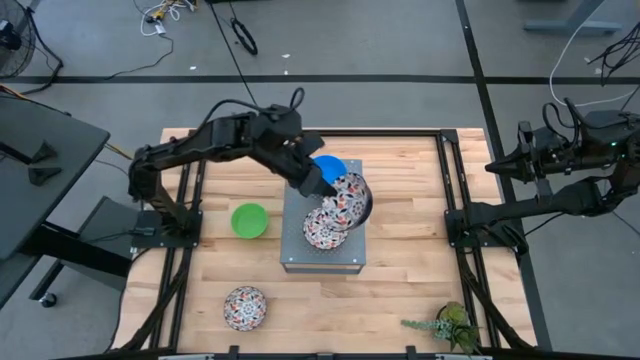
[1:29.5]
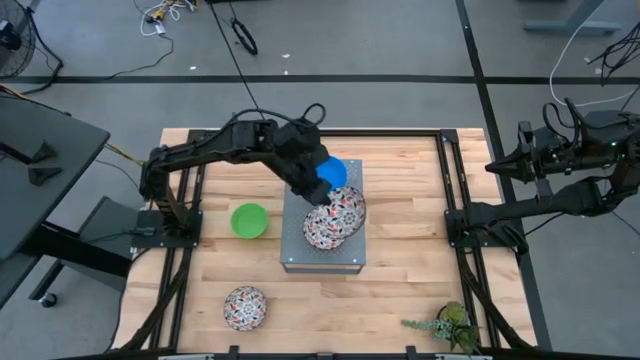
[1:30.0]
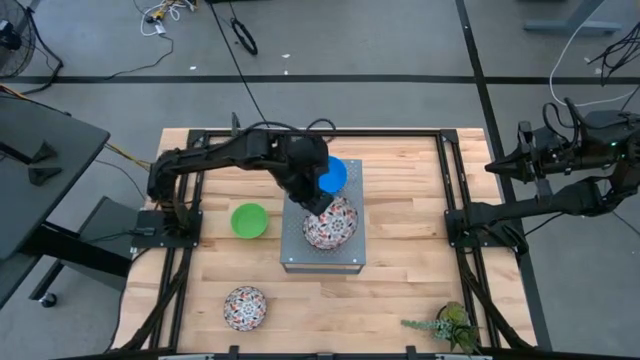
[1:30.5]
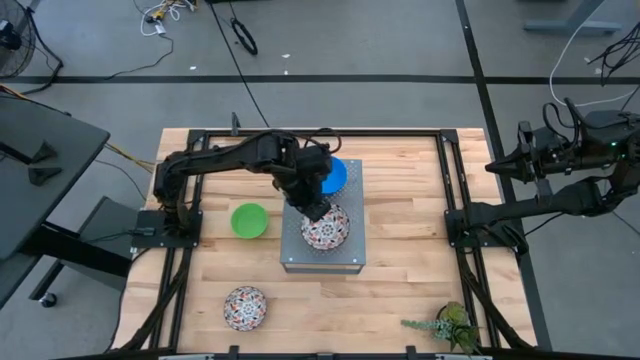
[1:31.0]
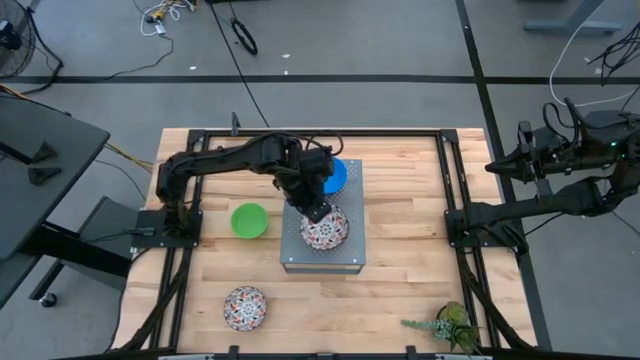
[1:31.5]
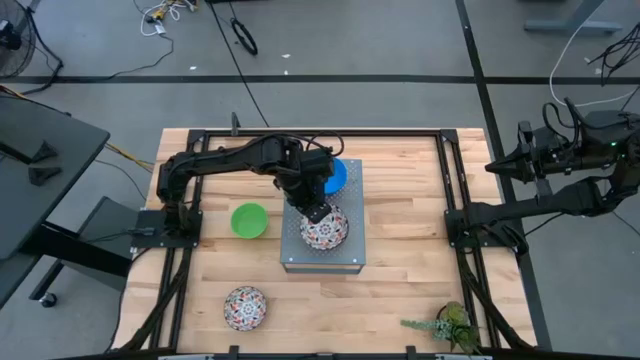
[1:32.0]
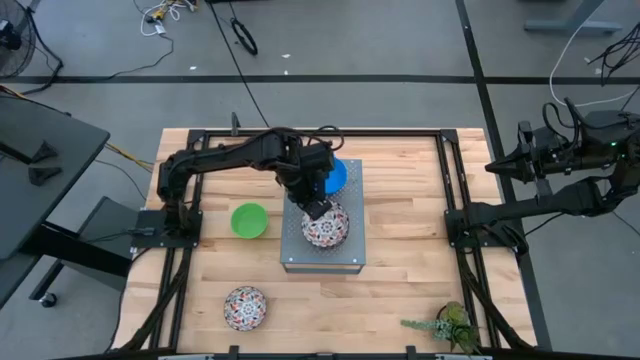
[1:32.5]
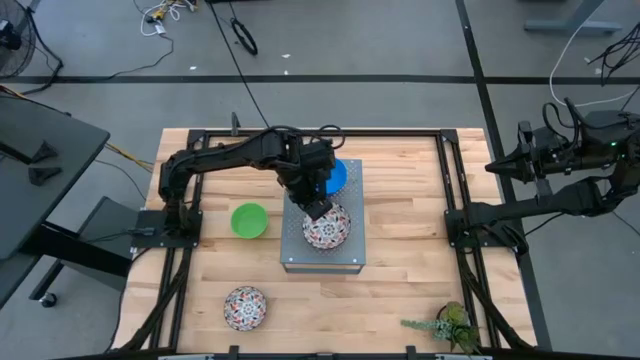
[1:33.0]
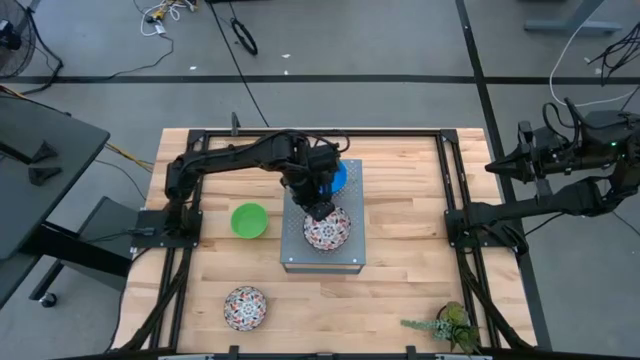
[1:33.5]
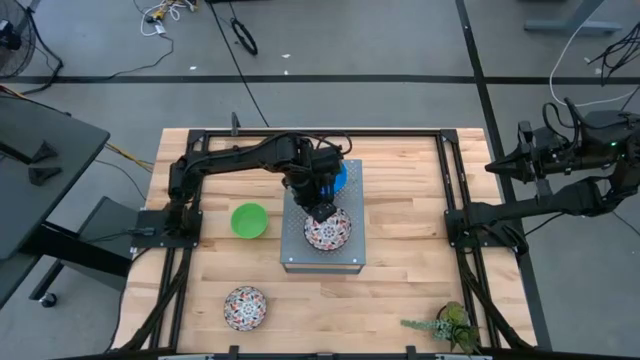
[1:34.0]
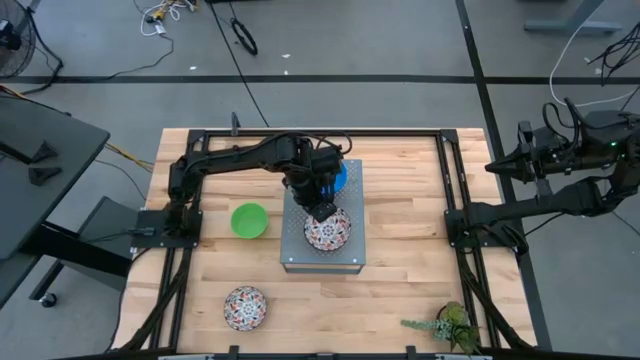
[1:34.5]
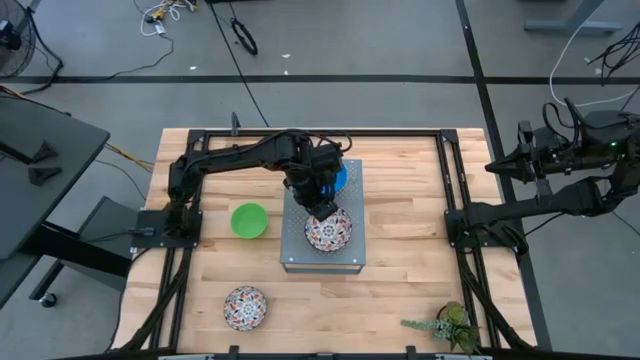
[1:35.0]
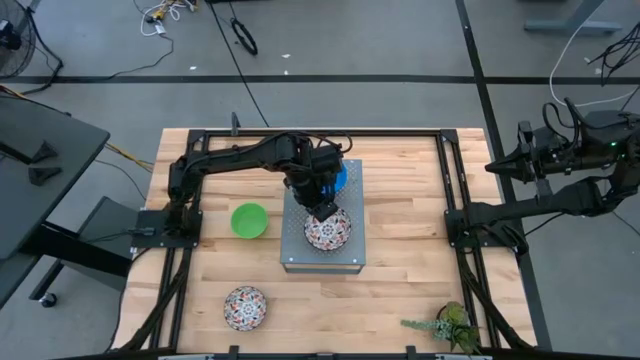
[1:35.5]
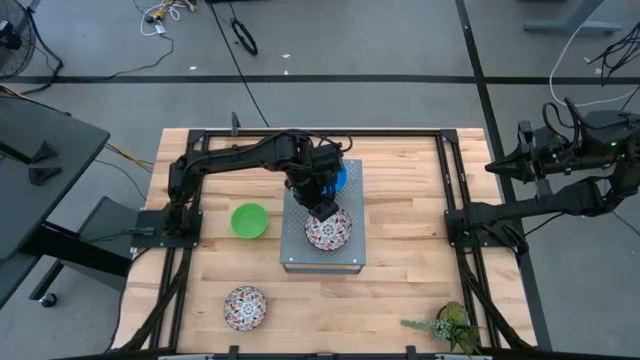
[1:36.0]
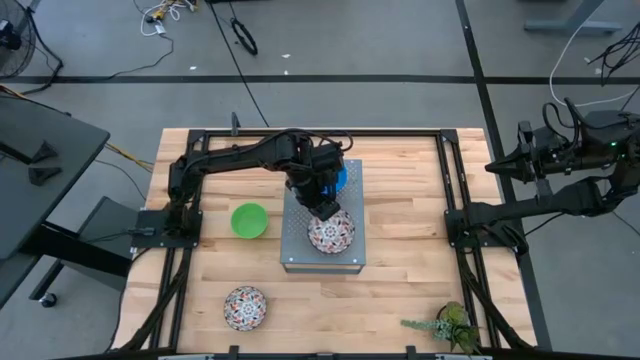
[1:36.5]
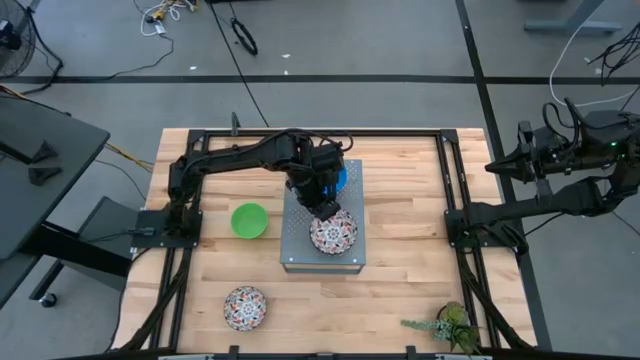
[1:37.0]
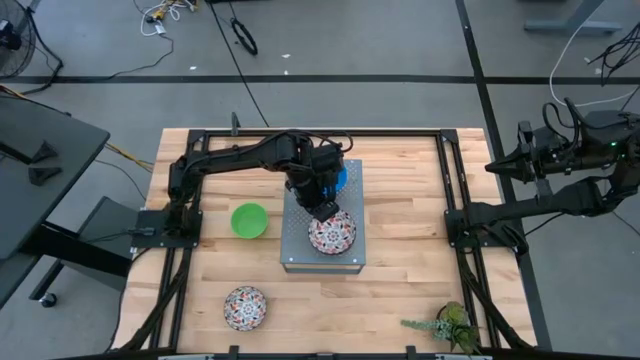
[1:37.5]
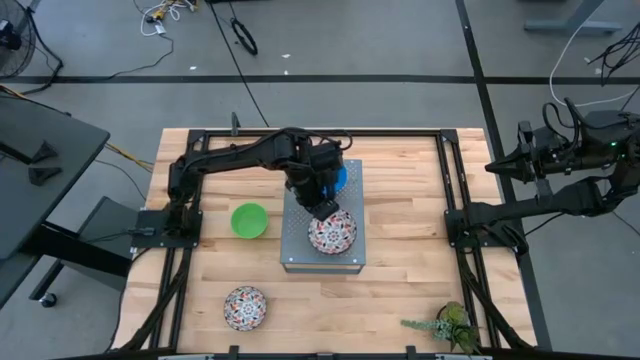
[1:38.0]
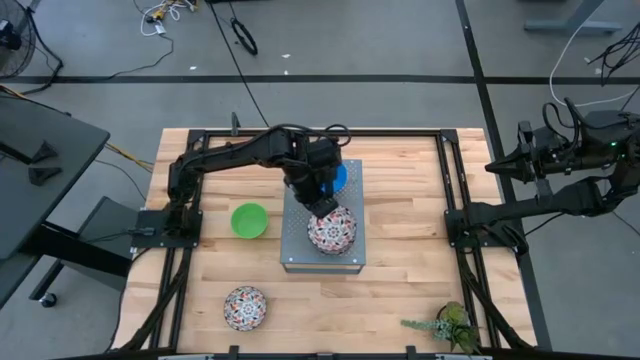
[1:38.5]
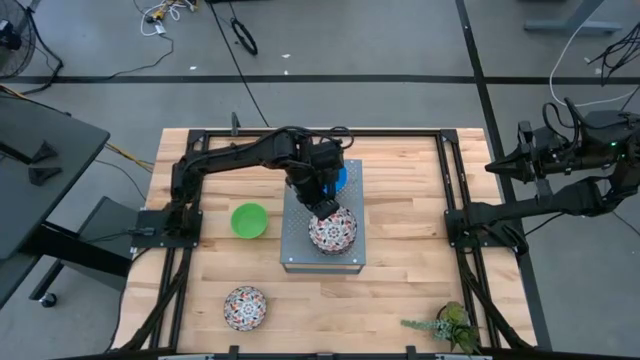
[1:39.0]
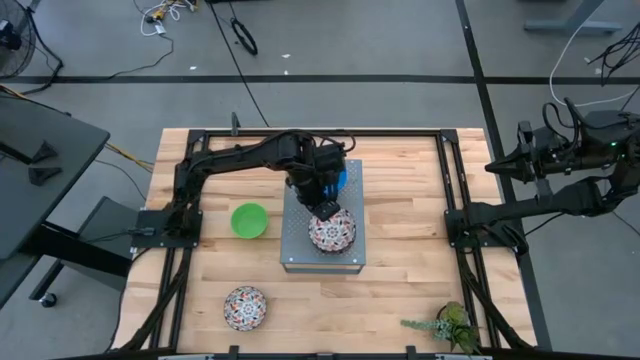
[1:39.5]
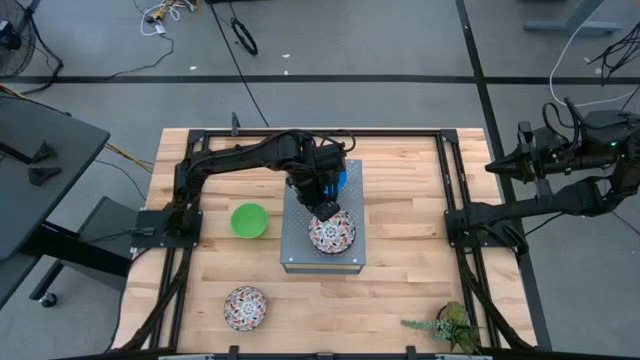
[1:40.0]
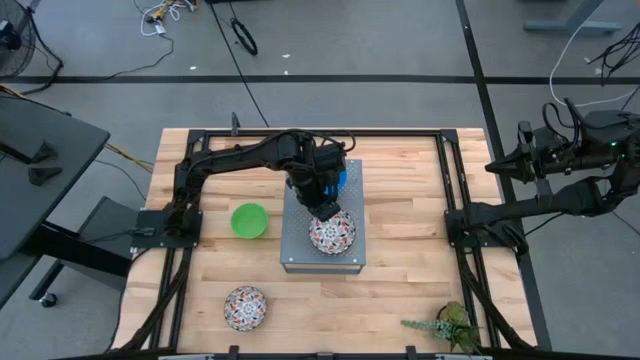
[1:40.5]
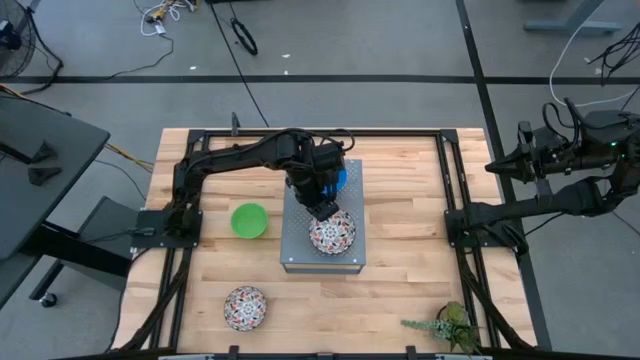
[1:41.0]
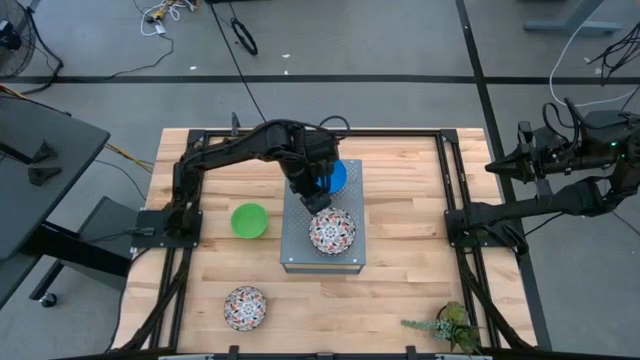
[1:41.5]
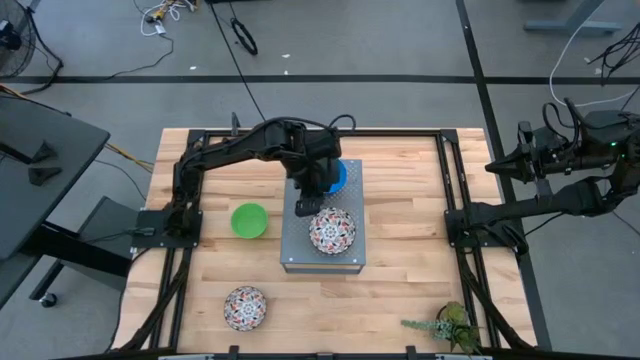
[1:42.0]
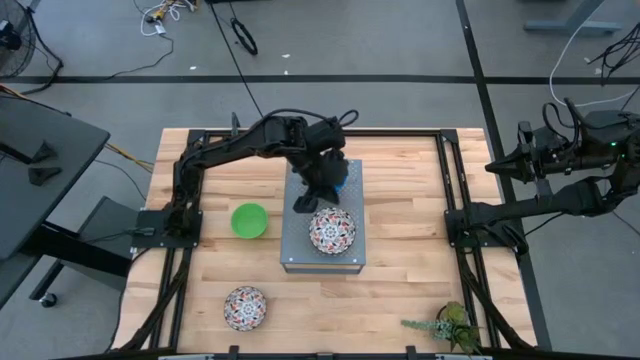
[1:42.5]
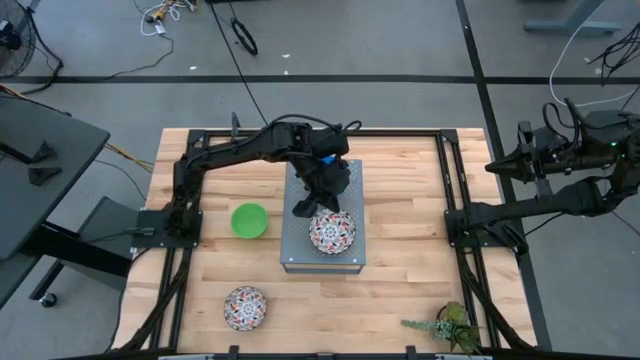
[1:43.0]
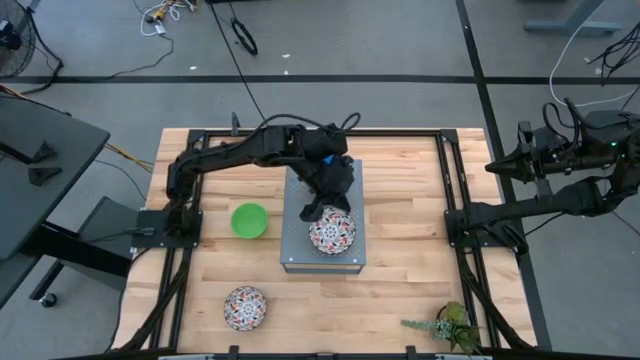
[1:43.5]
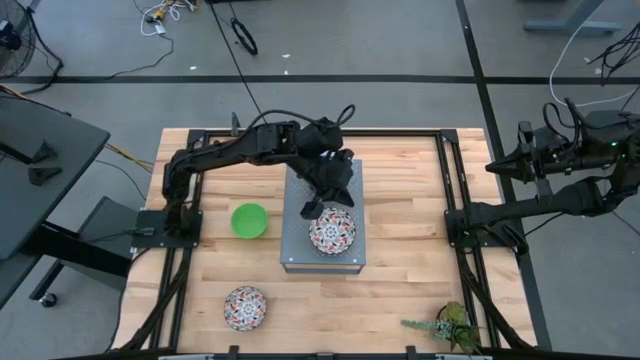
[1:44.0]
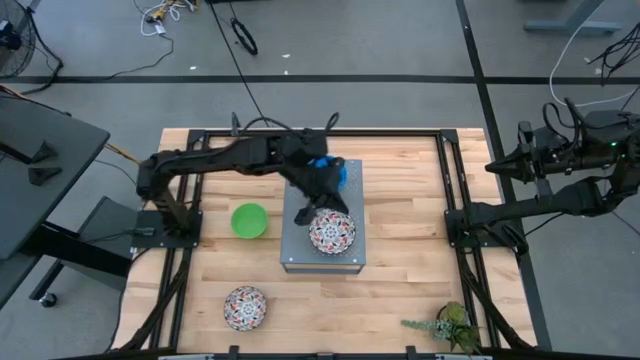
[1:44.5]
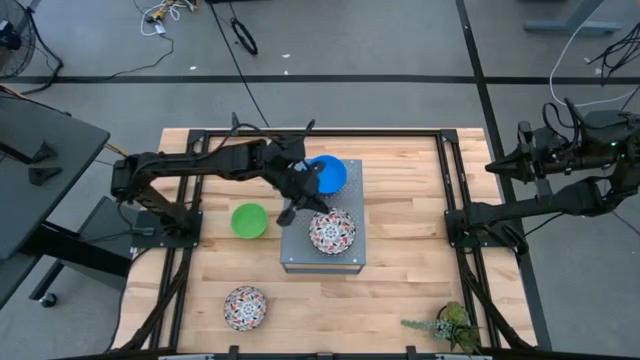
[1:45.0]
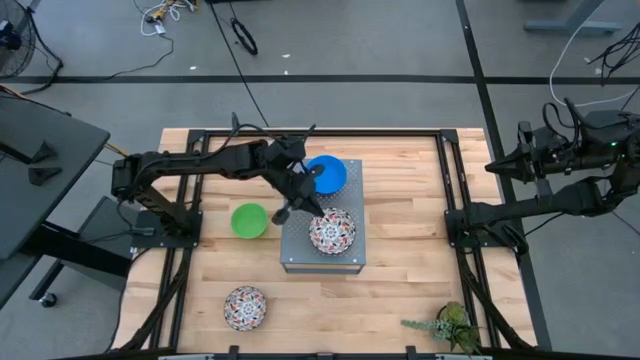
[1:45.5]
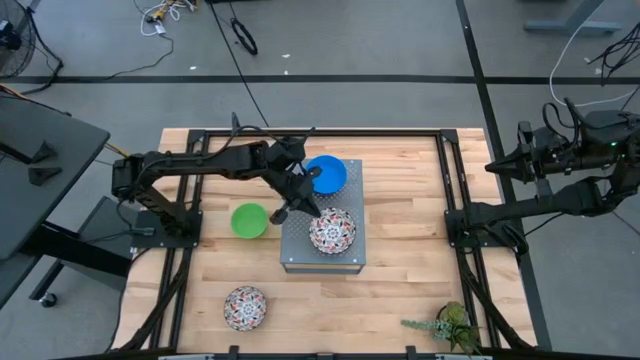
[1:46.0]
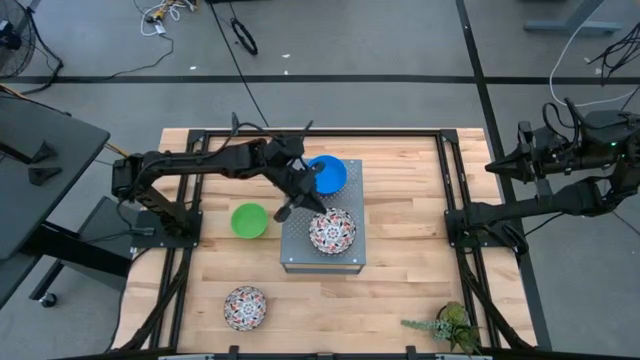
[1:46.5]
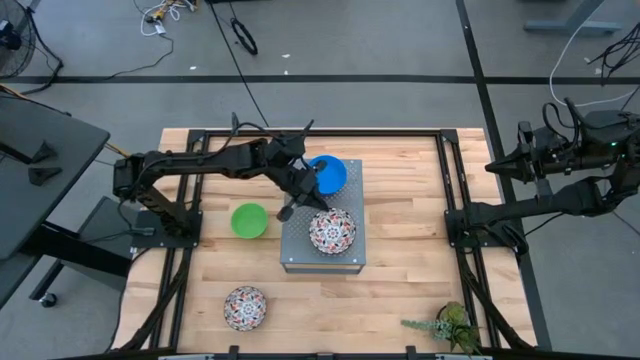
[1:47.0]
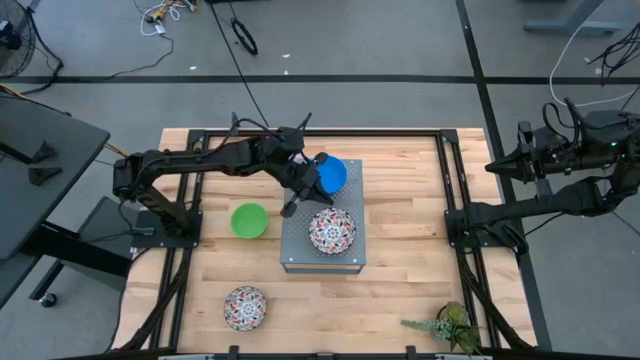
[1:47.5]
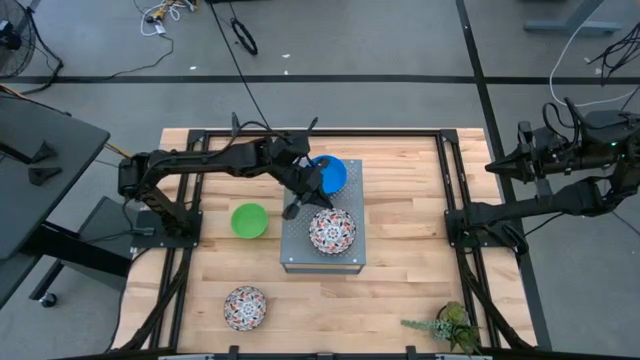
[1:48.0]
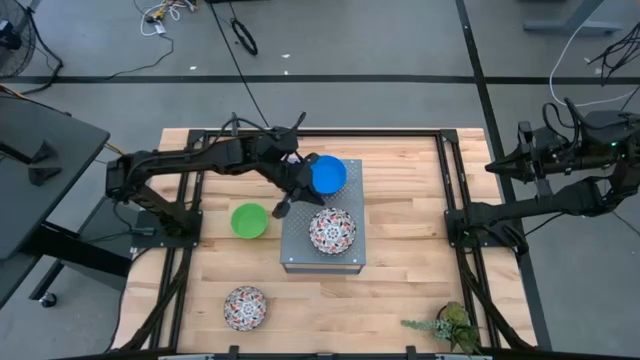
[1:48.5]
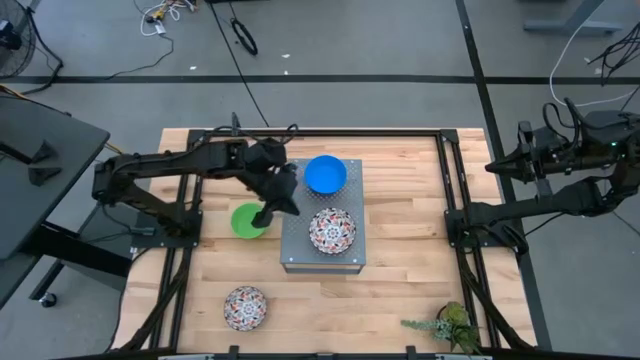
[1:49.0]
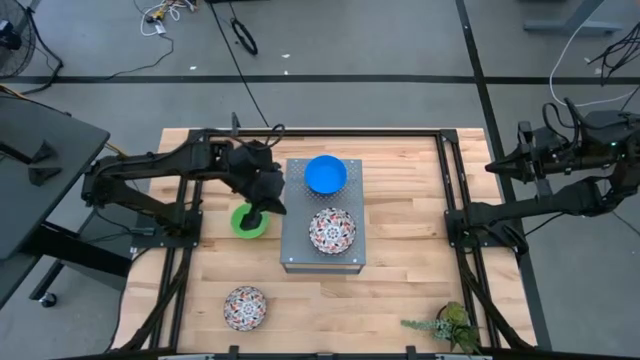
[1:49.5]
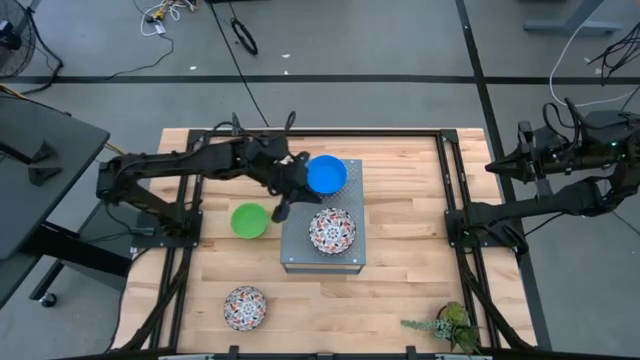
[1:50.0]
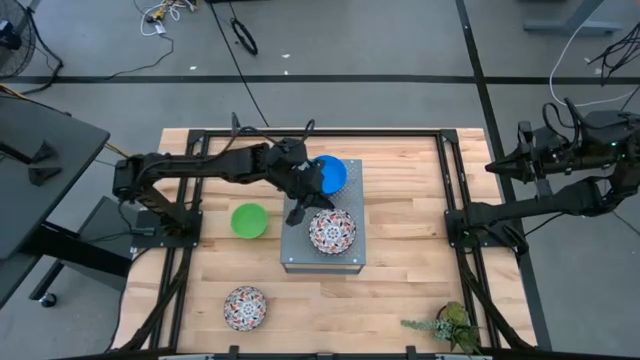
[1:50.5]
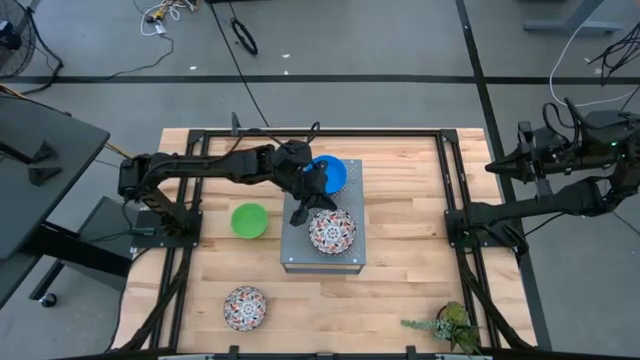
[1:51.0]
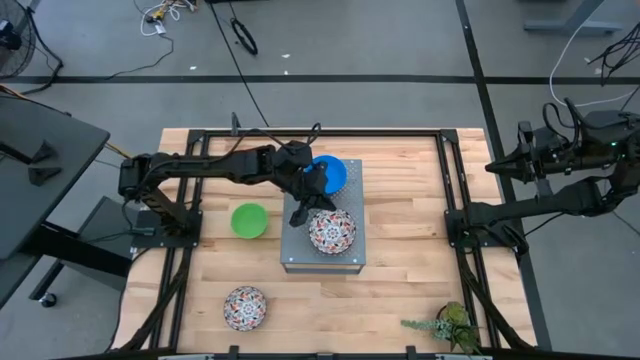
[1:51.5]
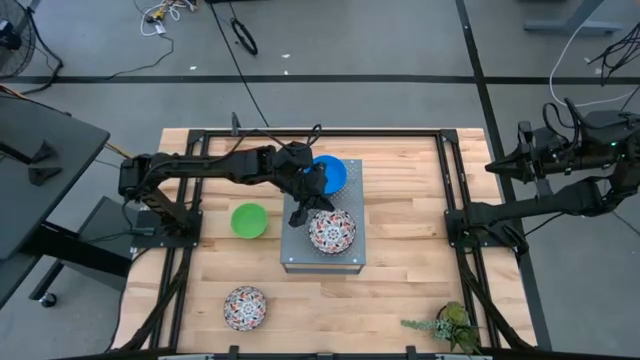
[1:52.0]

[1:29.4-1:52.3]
Task: Pick & Place Mini bowls
Stack the top white patterned bowl on top of the white patterned bowl on the shelf
